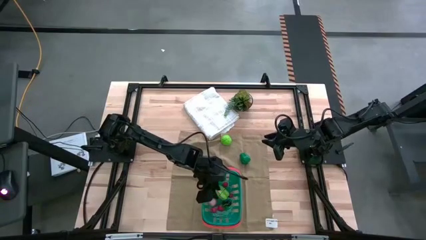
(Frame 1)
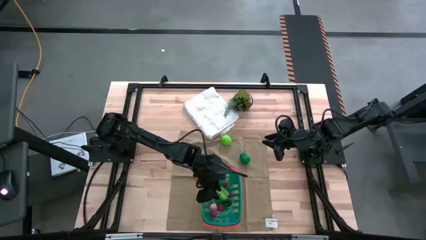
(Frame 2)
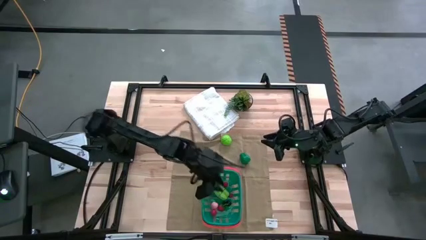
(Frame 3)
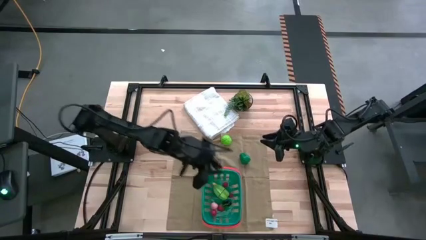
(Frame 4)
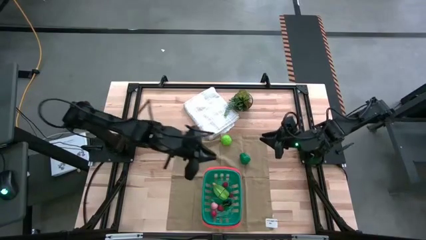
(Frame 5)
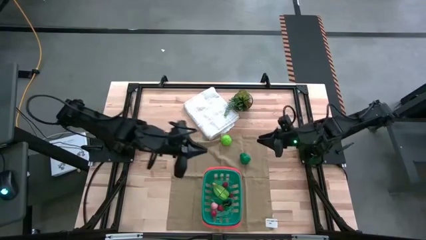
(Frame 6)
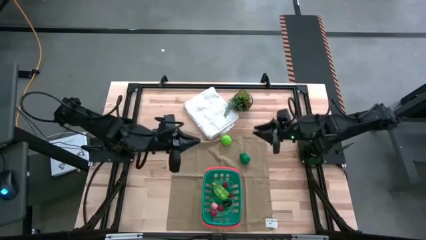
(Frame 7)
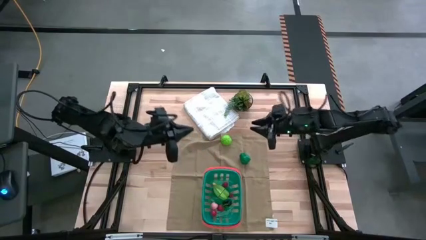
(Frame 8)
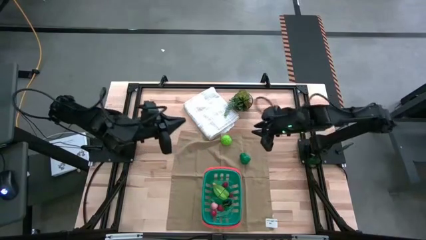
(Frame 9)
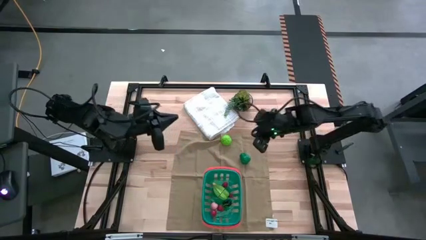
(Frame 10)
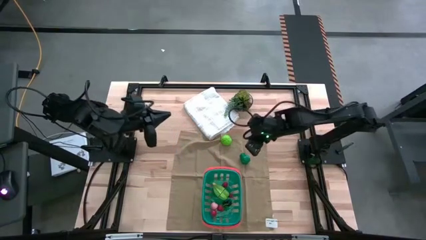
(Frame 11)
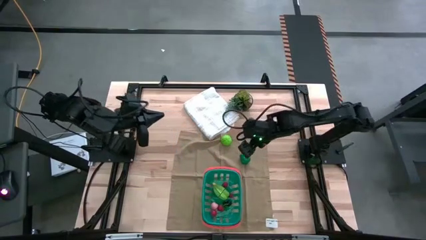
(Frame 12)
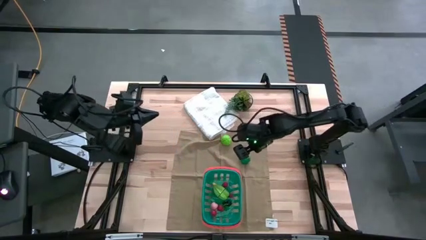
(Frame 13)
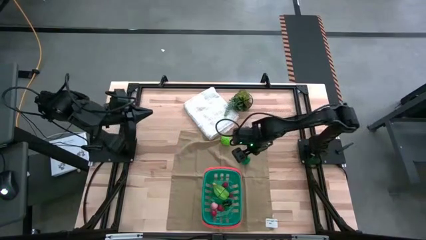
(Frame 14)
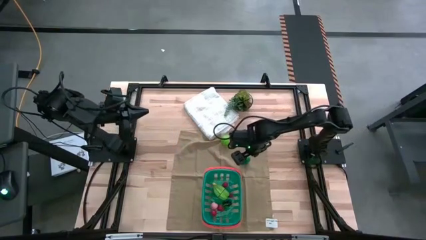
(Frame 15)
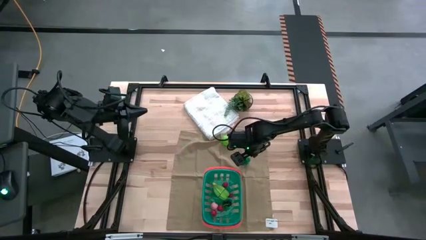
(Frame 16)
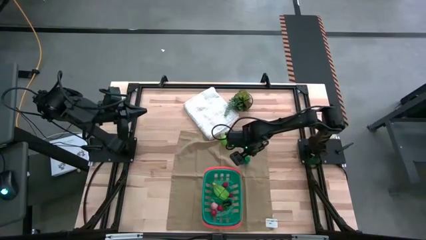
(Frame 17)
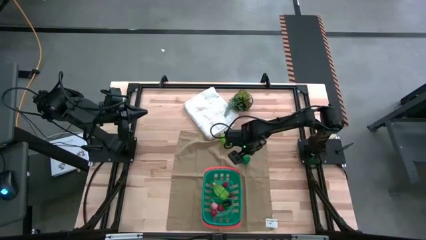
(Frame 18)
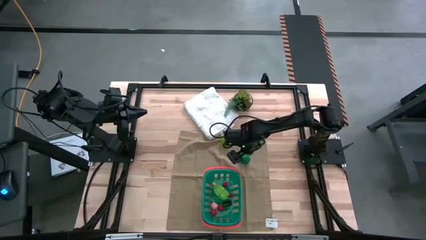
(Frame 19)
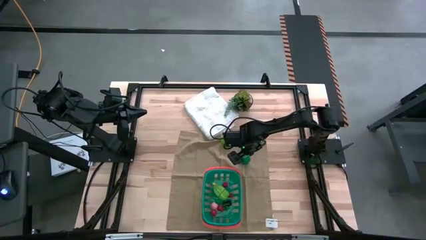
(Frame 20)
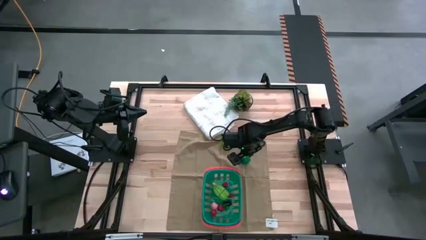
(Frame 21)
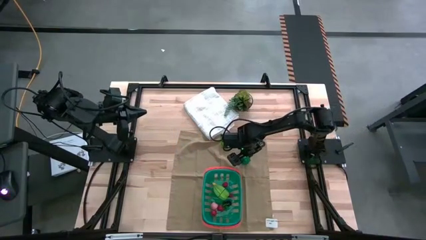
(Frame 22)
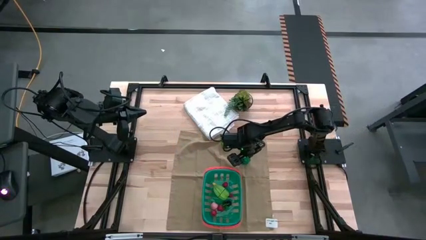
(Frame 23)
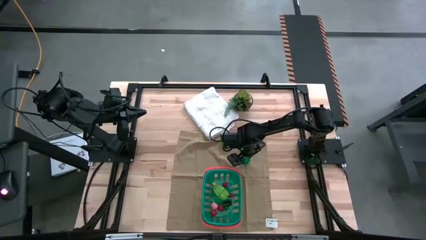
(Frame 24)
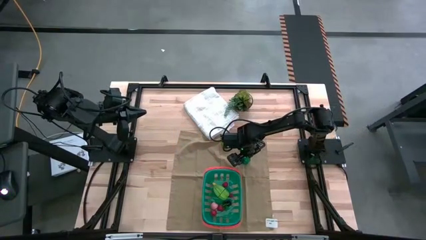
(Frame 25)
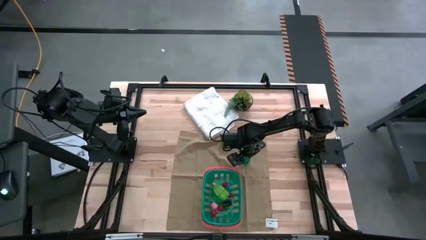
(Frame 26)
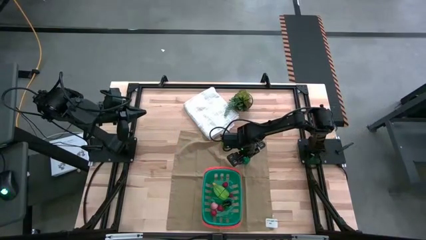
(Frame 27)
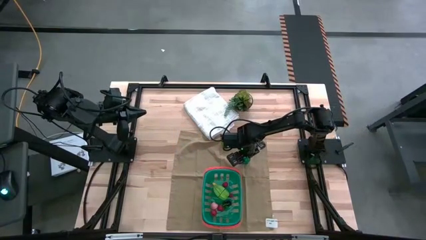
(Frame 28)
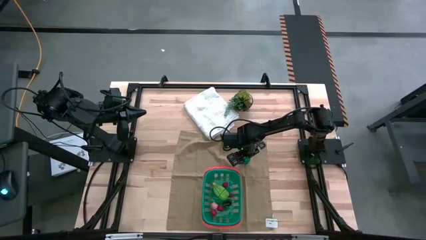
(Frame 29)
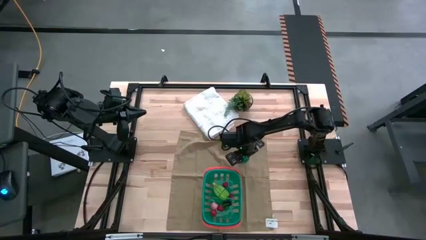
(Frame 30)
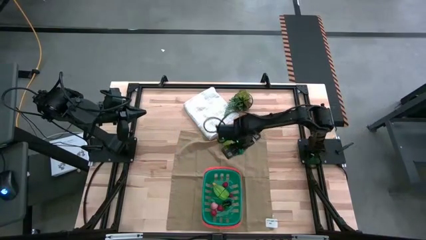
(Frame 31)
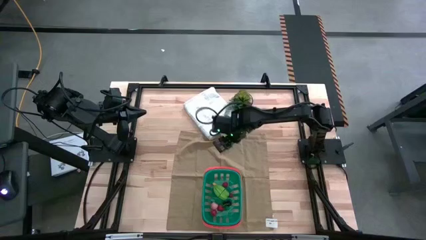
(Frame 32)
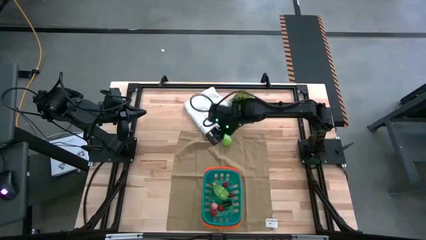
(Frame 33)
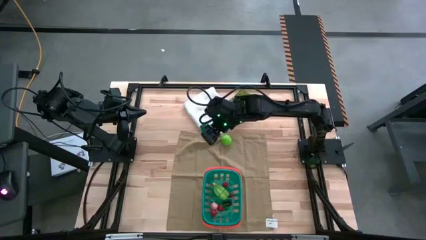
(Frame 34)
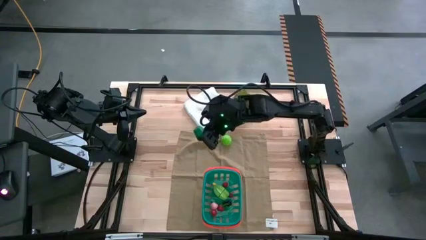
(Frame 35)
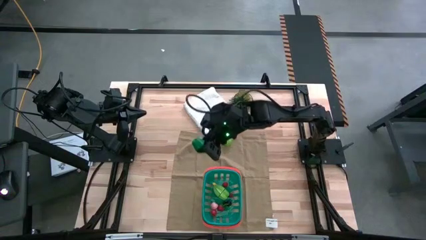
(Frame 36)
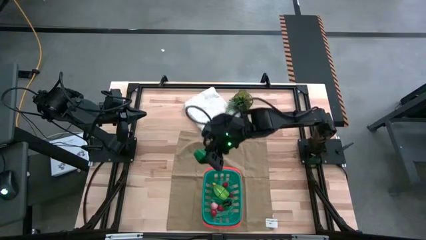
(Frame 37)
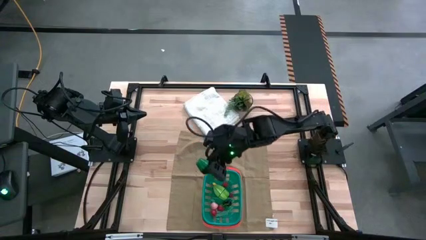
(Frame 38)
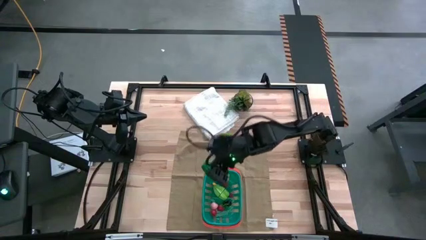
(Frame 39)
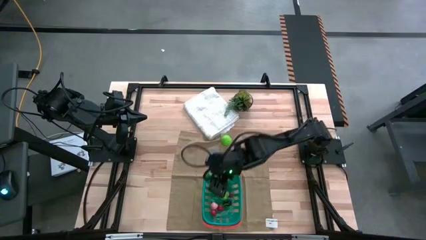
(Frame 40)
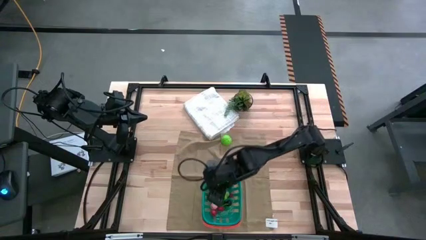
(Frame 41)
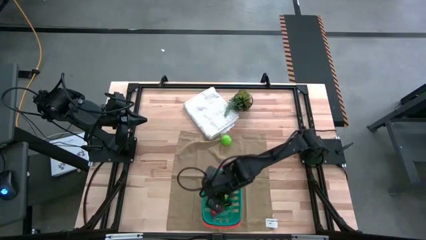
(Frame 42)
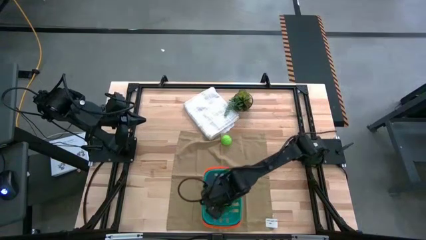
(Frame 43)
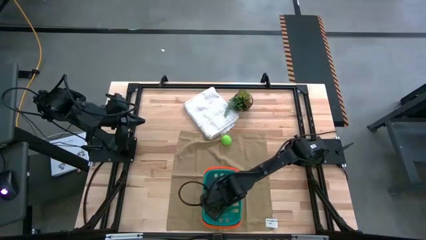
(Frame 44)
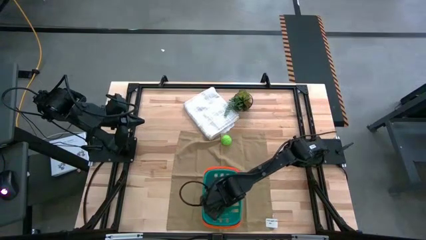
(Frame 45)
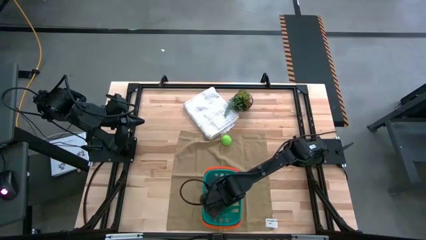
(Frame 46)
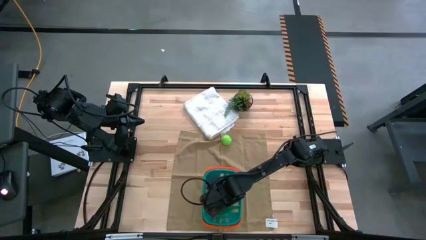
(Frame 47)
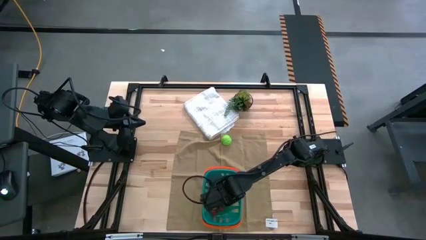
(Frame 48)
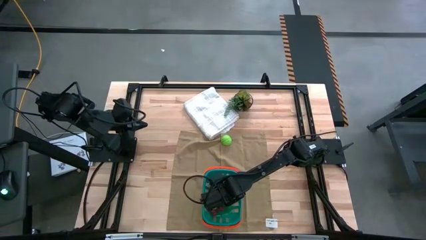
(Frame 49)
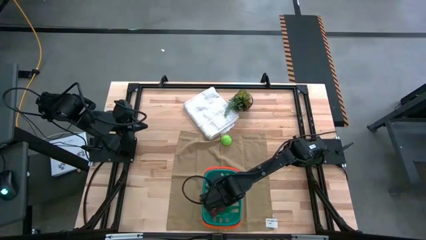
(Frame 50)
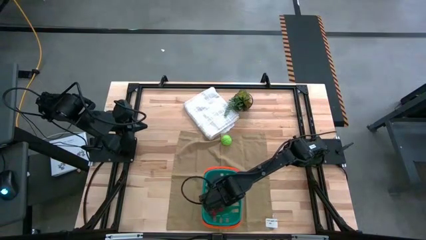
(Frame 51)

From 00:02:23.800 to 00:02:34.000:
Task: Pick and placing Produce into tupperware
Put the green bell pepper into the blue bin

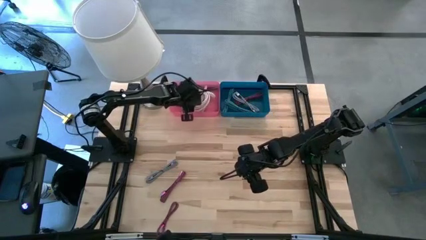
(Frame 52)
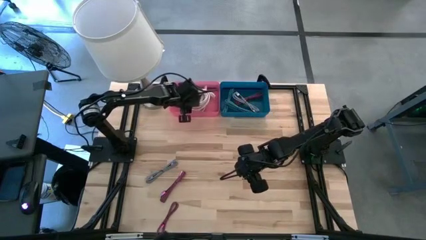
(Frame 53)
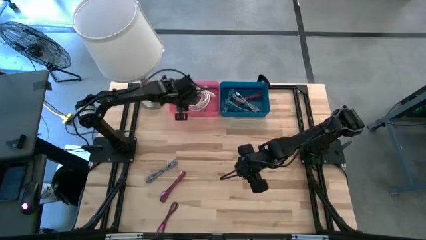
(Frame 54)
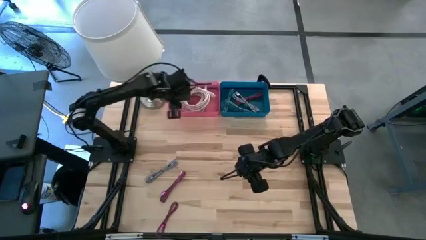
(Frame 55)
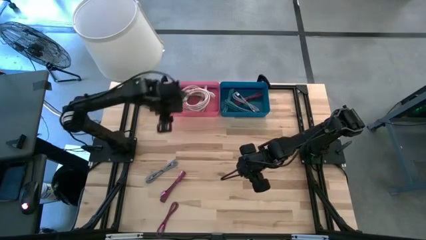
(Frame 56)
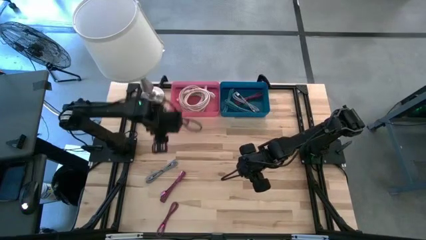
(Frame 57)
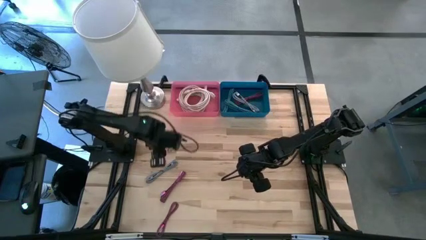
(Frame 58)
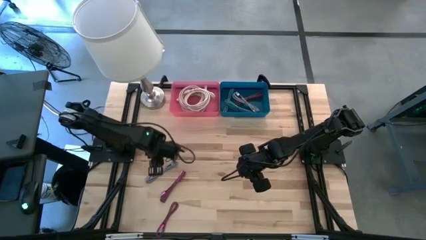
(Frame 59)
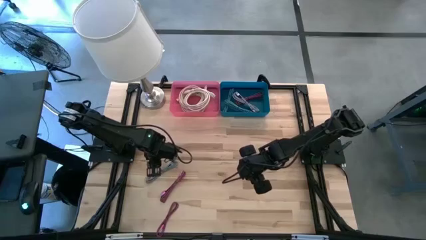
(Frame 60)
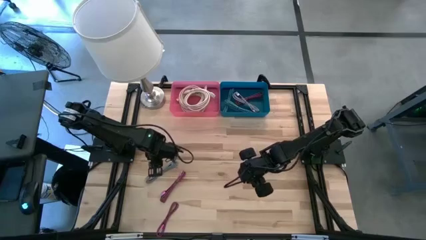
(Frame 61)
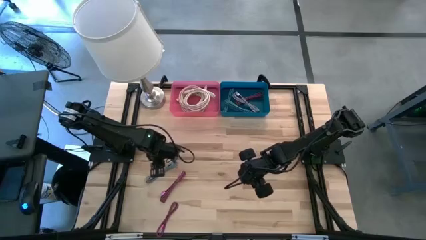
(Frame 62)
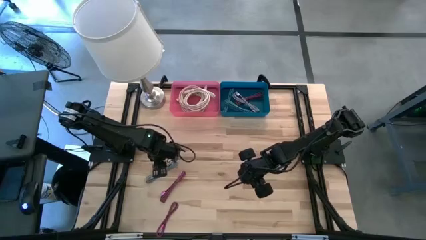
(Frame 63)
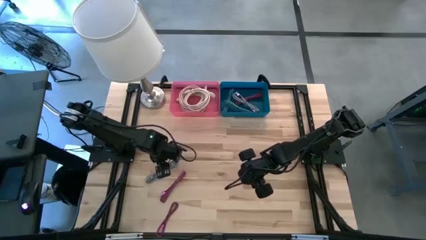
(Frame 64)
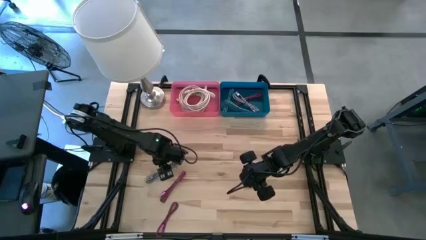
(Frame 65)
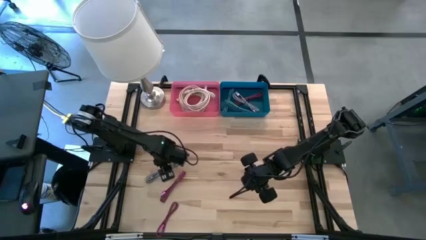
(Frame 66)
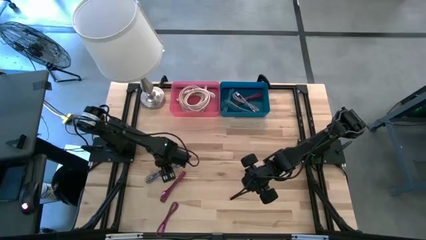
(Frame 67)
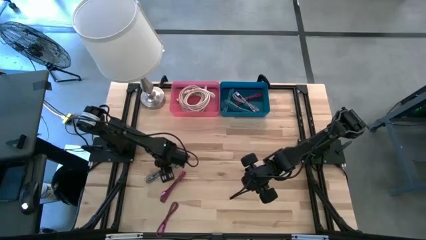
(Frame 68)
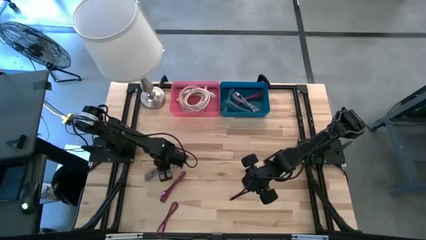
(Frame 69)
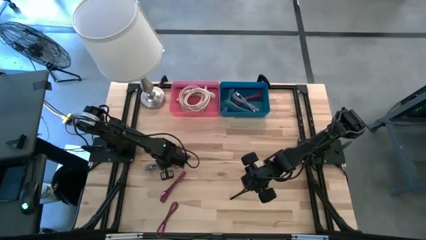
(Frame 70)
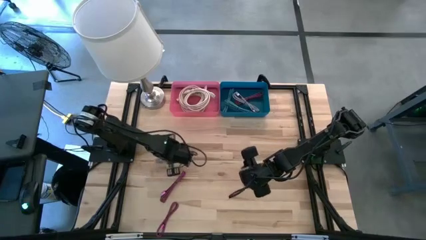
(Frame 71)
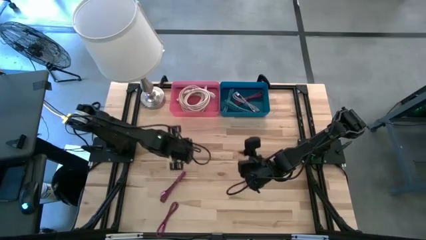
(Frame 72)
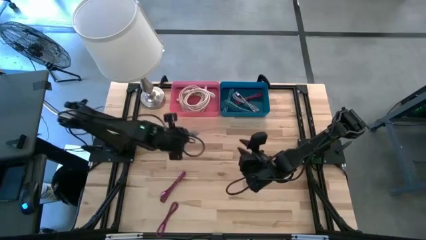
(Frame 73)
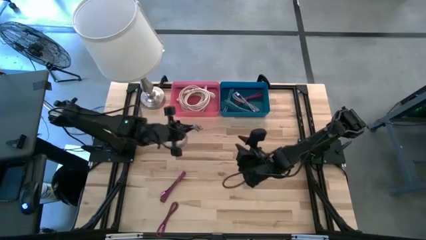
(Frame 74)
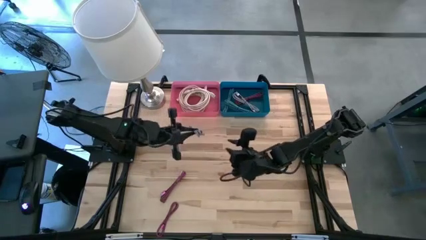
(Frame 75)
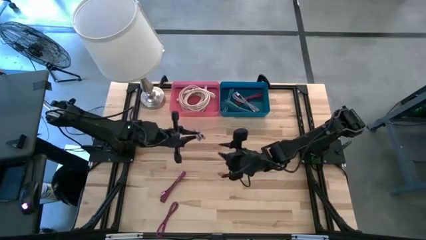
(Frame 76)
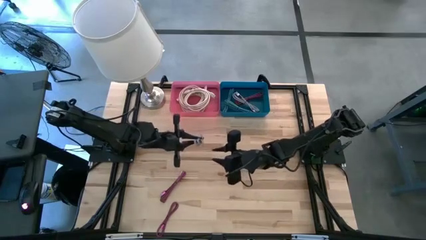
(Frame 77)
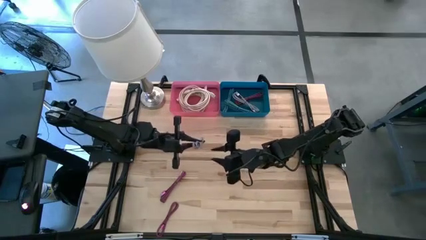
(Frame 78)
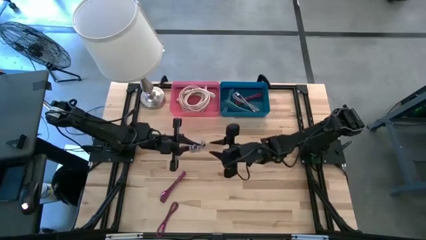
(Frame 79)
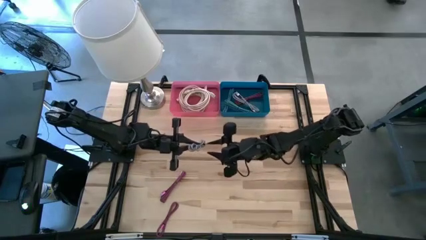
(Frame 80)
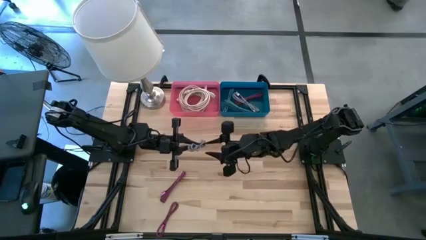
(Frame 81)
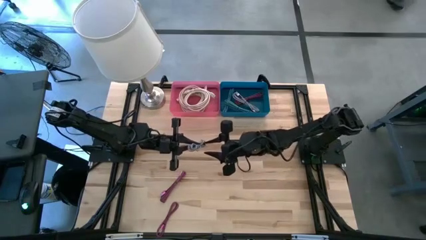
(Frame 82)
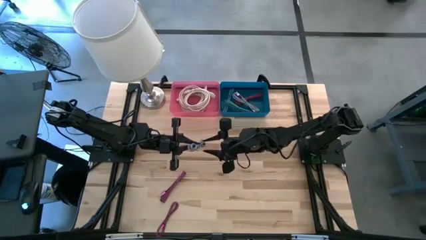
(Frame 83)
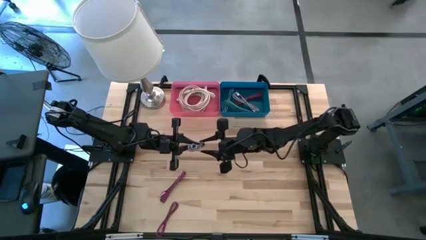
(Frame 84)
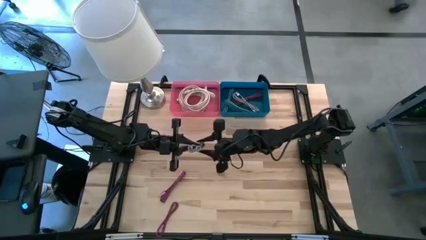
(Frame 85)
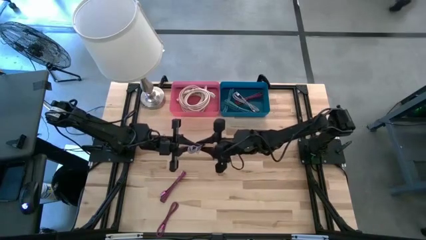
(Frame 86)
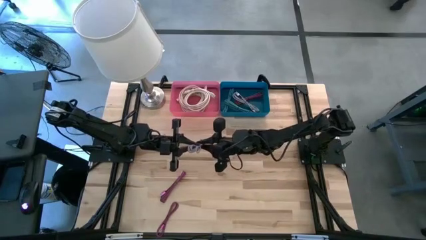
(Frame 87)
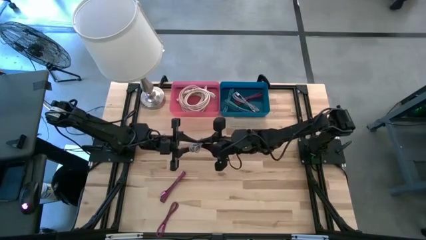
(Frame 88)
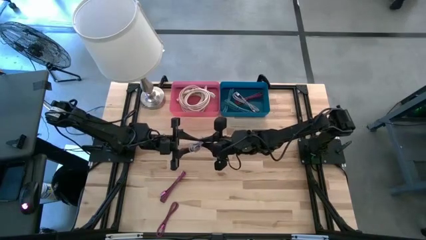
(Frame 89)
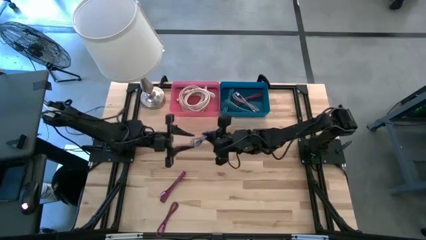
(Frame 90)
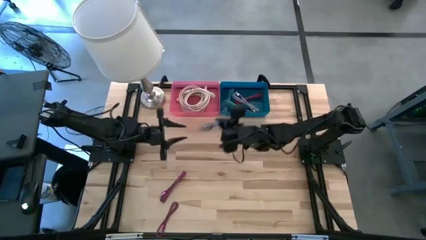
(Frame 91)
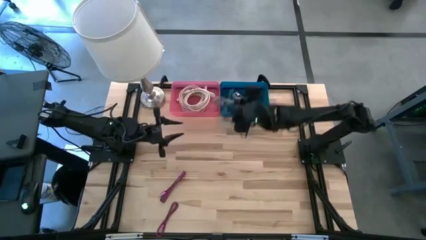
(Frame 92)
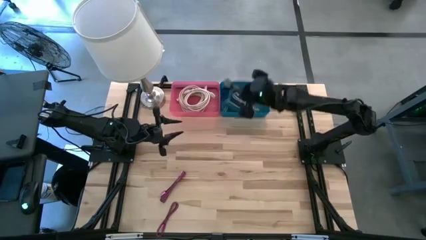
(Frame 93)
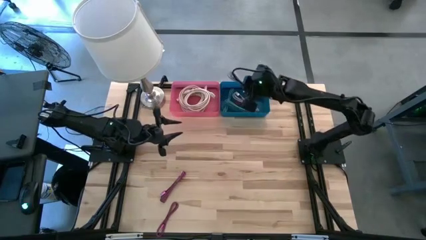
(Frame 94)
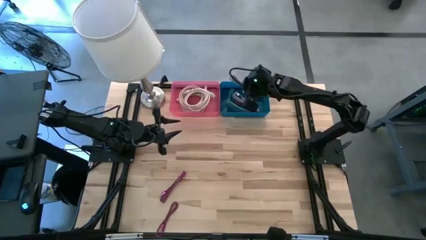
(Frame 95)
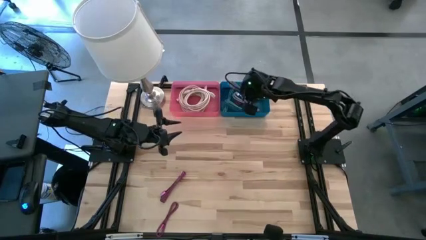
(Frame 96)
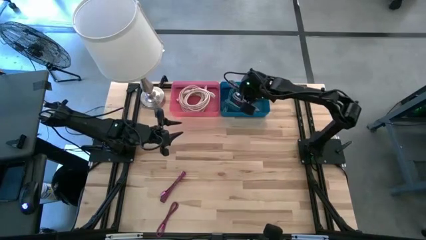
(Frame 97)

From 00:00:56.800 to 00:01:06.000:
Task: Pick & Place USB Port
Put the small black and white charger cable into the blue bin
